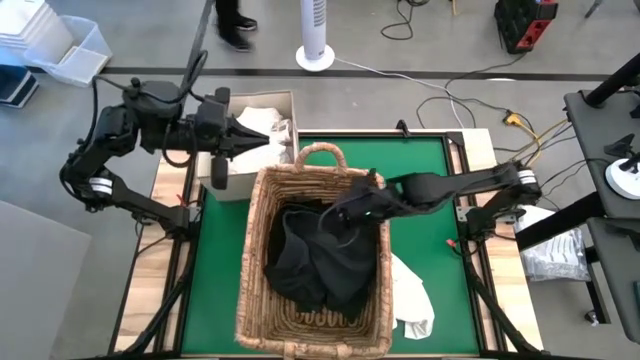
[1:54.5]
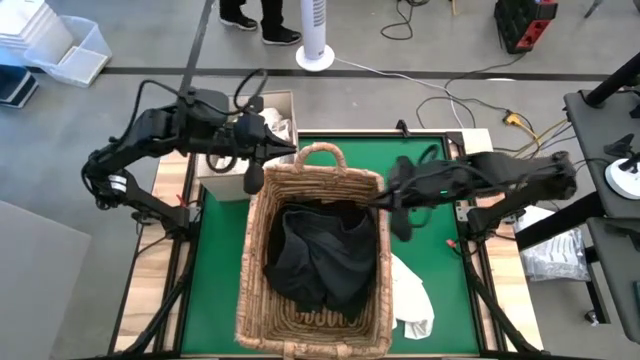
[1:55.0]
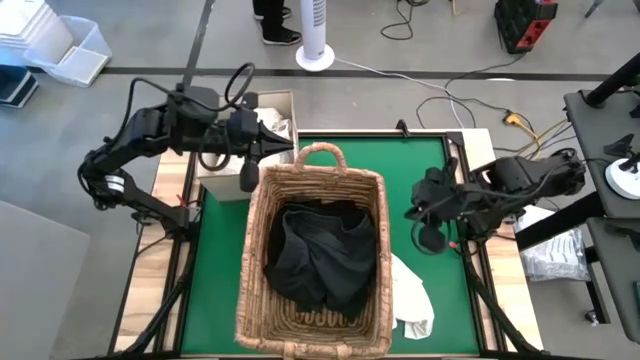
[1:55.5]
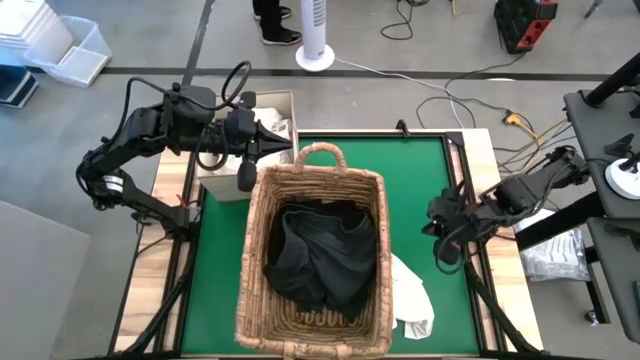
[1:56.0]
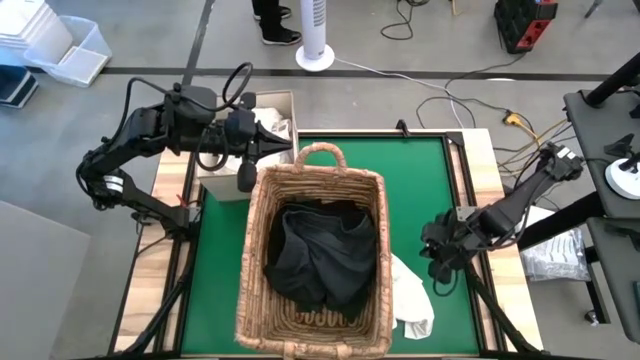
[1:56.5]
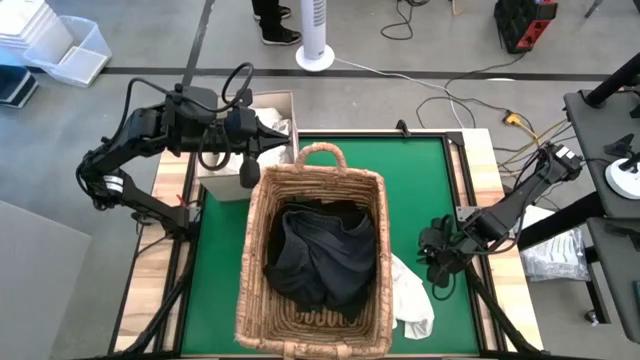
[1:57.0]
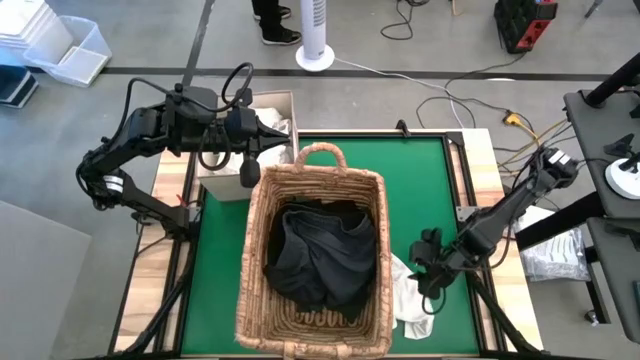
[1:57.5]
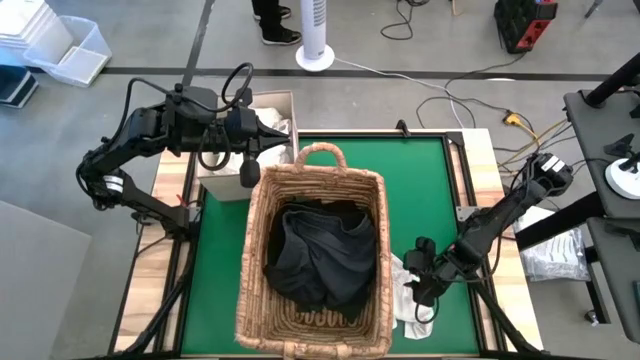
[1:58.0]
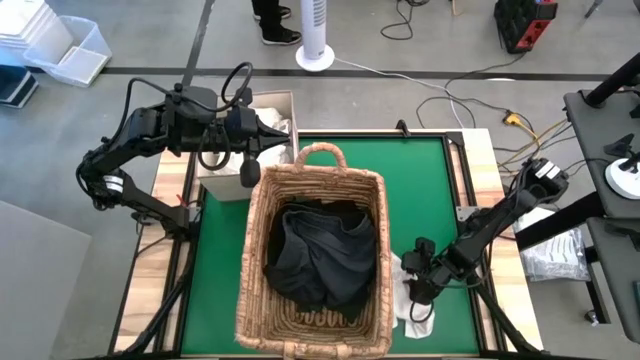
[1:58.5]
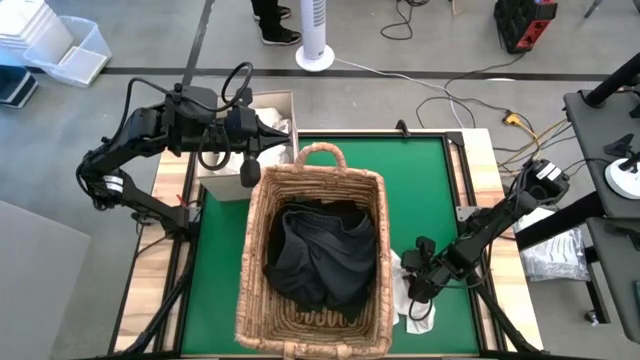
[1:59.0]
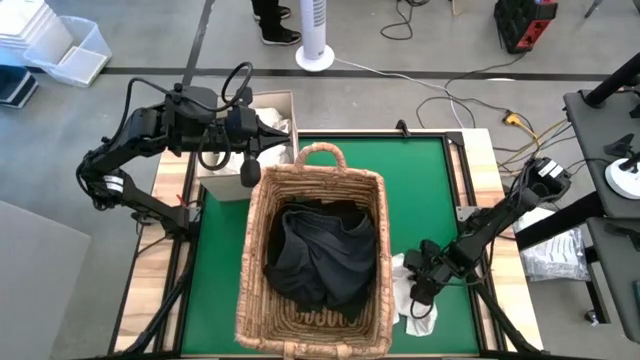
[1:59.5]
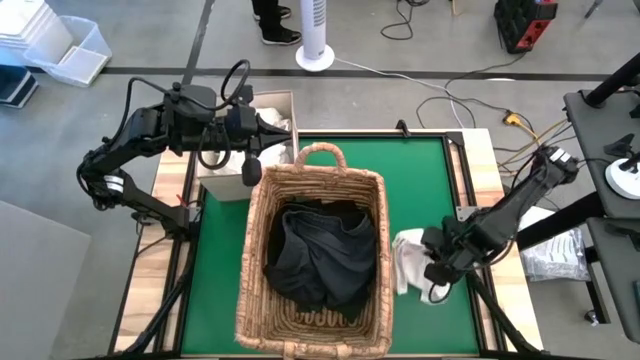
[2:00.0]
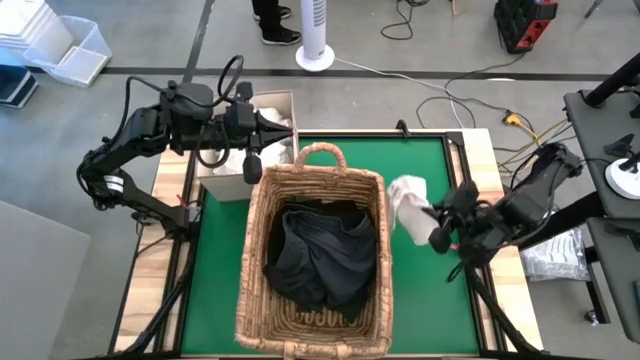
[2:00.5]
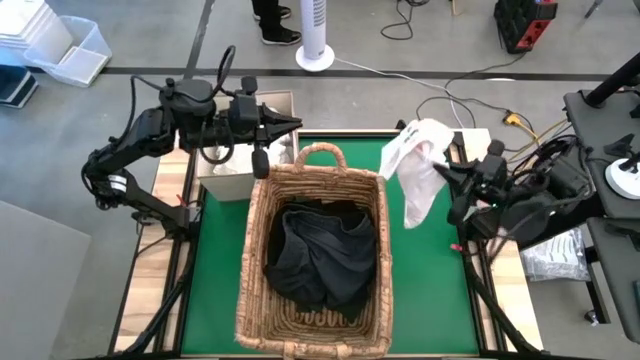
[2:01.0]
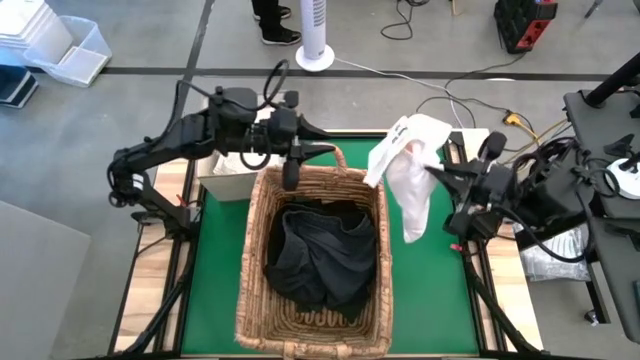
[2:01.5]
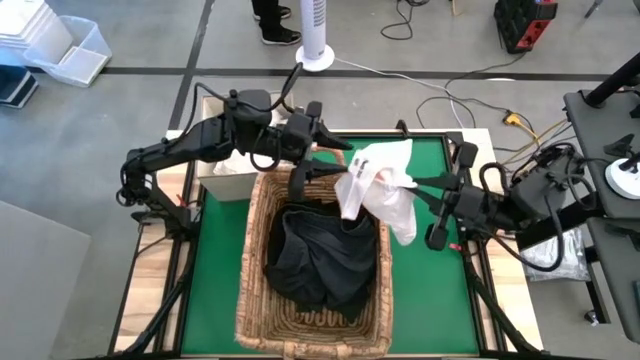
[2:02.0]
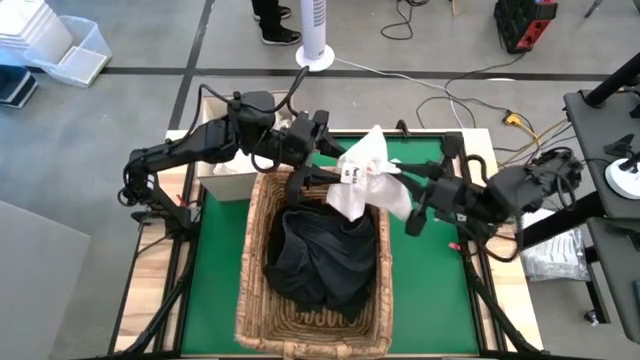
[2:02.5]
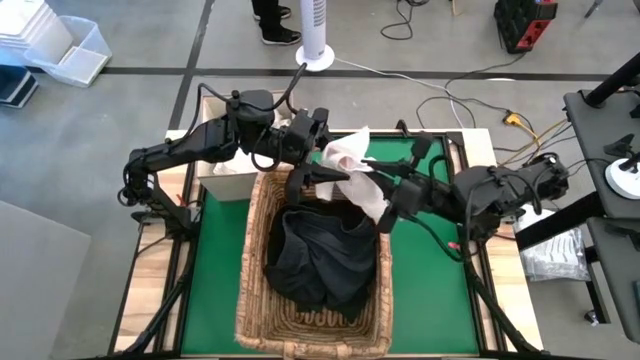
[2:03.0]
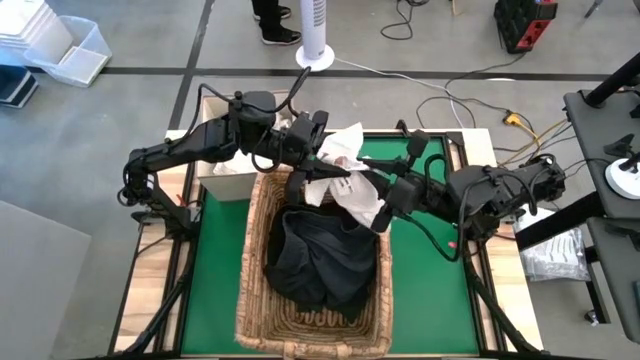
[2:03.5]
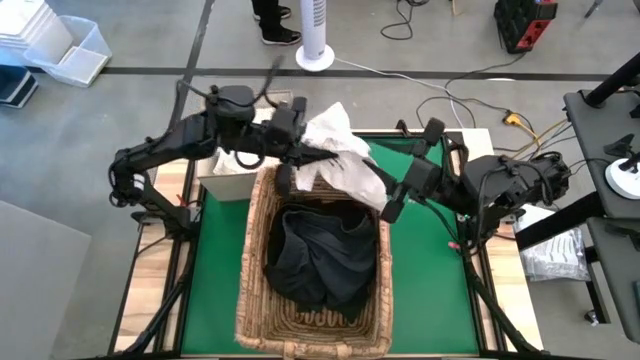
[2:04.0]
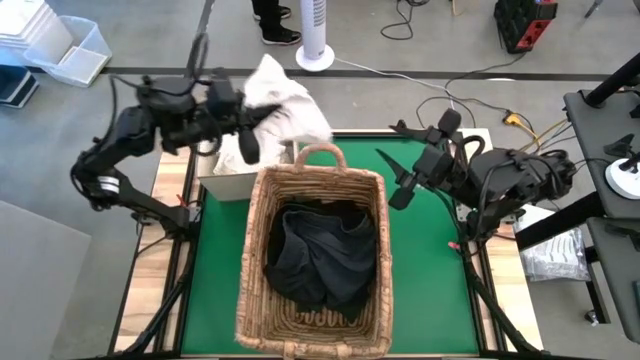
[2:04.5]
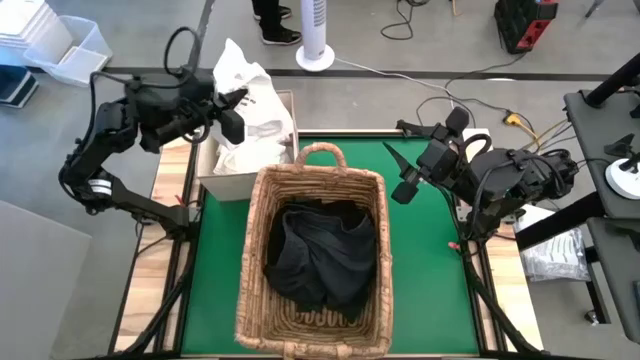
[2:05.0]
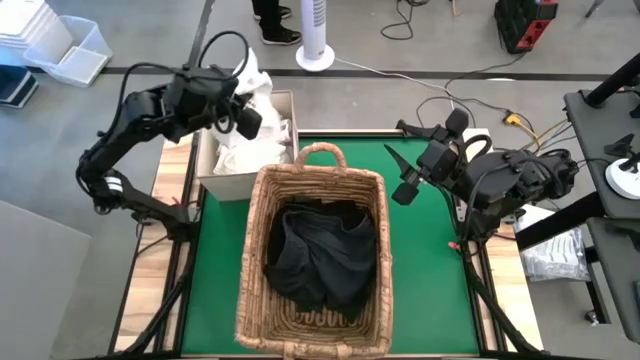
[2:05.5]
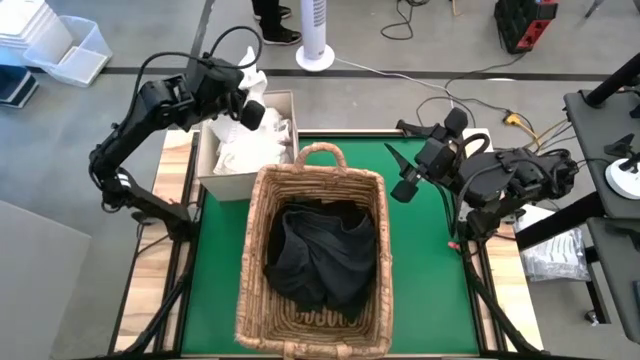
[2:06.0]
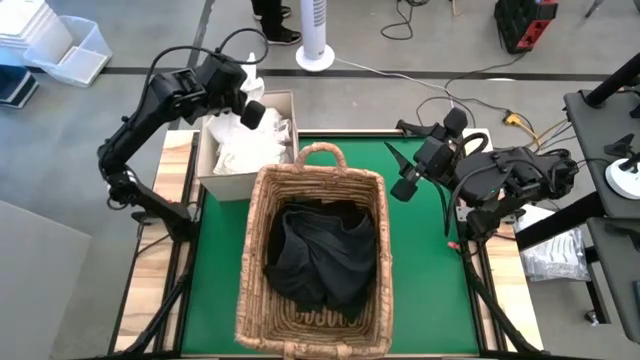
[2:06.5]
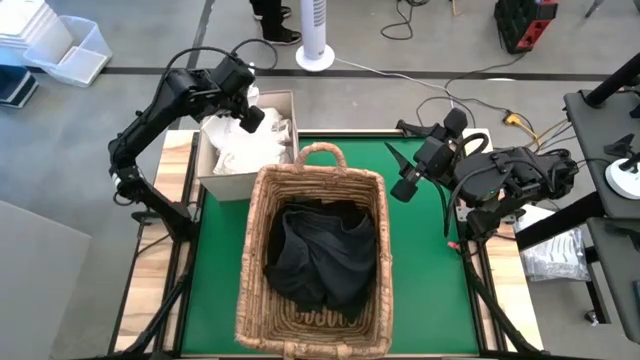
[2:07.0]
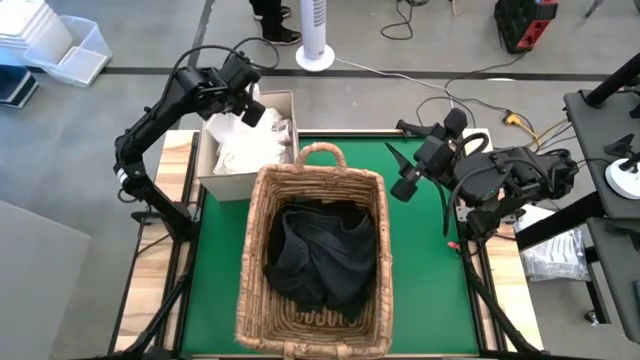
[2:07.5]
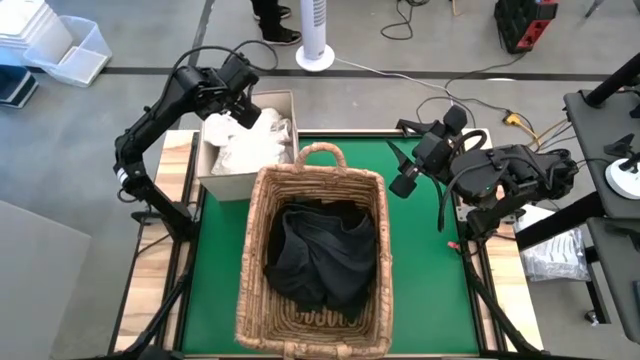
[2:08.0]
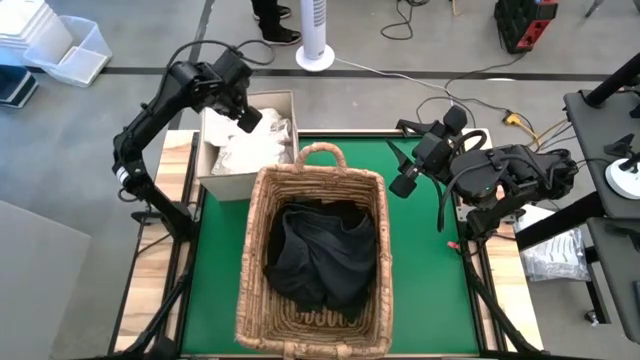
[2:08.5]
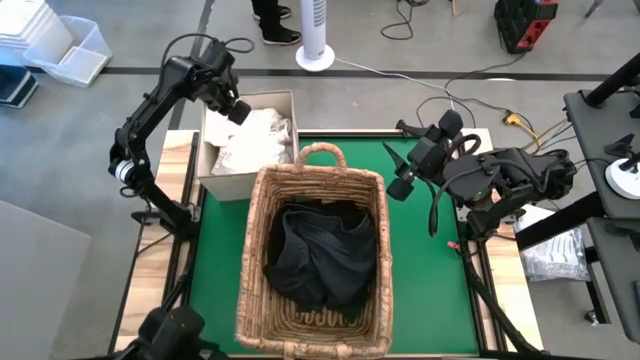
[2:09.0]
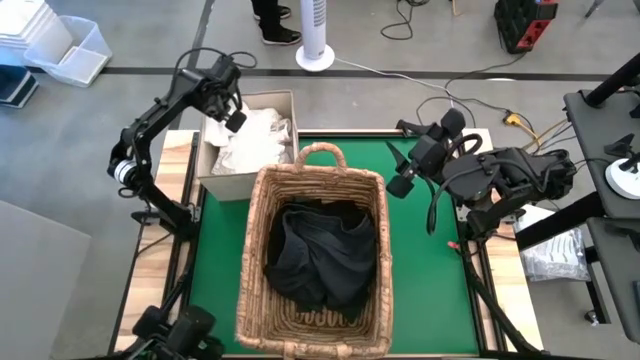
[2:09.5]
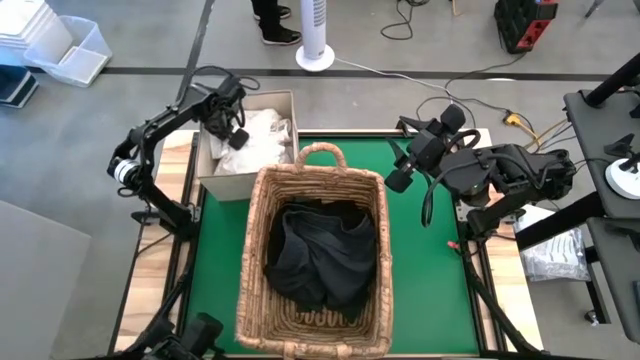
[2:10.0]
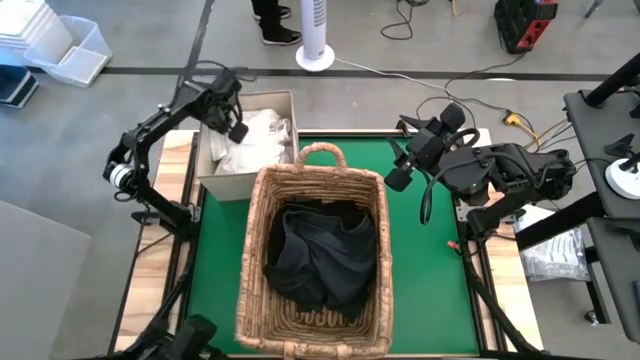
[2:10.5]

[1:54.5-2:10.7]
Put the white shorts into the gray laundry organizer
